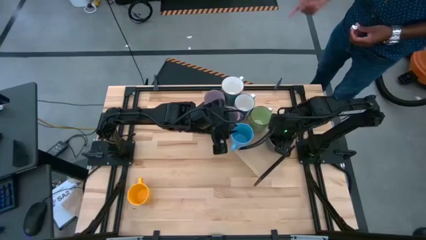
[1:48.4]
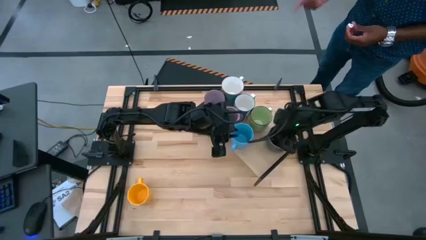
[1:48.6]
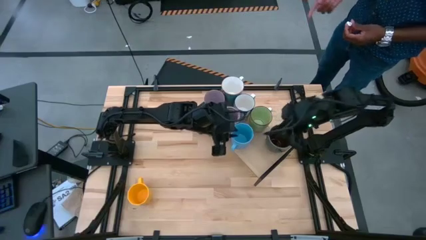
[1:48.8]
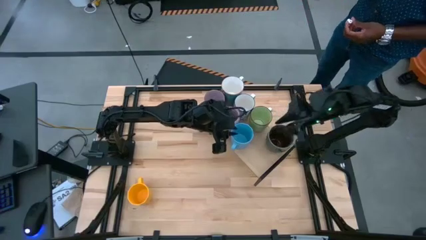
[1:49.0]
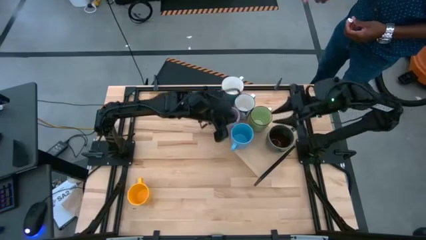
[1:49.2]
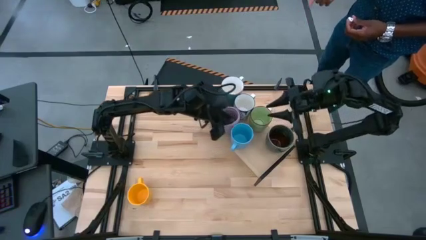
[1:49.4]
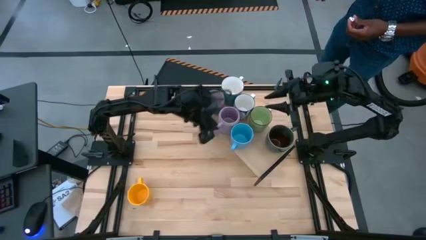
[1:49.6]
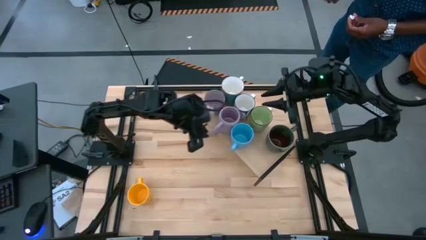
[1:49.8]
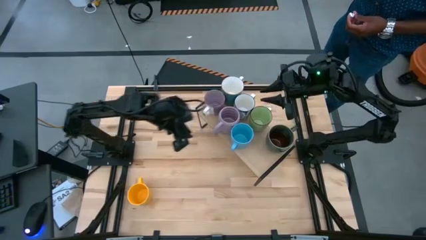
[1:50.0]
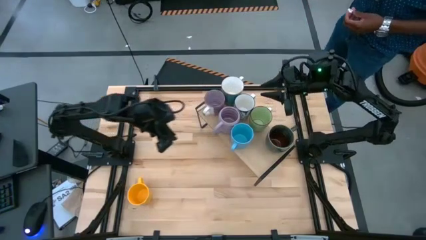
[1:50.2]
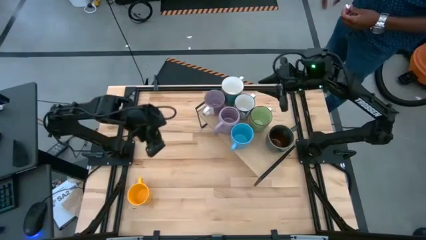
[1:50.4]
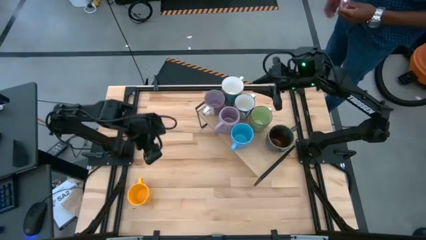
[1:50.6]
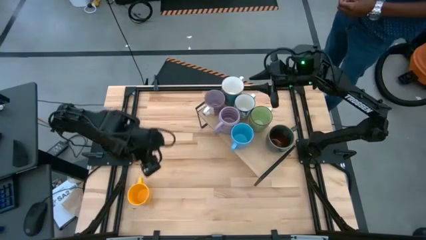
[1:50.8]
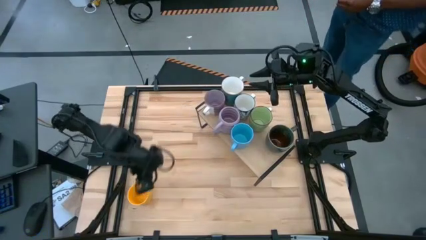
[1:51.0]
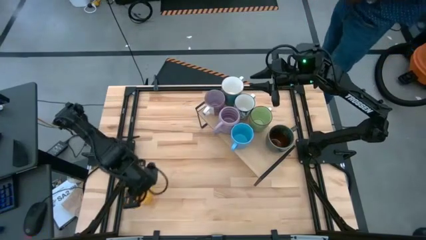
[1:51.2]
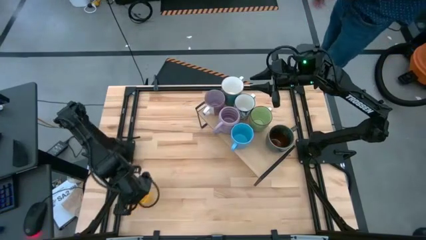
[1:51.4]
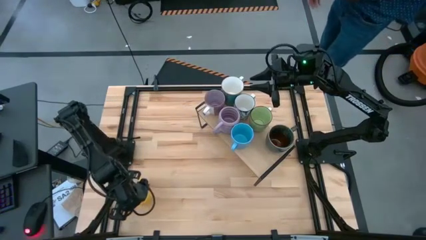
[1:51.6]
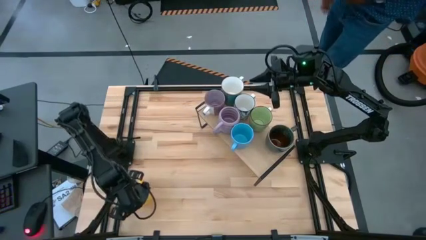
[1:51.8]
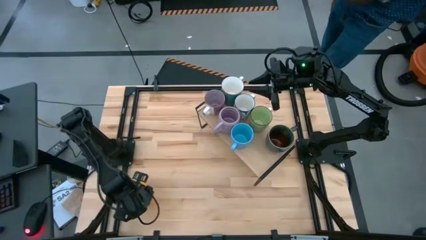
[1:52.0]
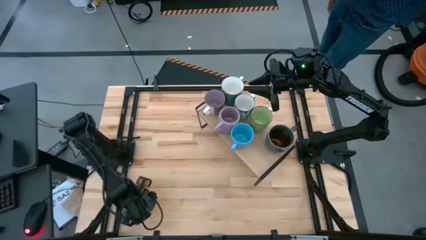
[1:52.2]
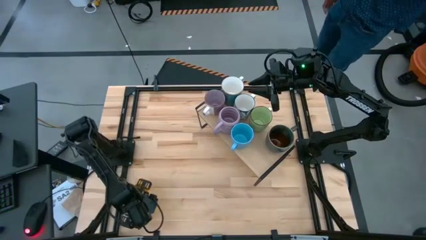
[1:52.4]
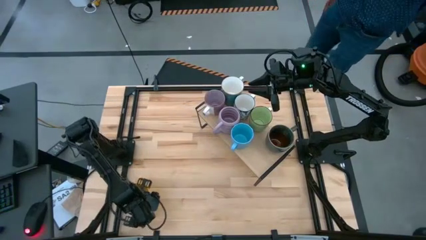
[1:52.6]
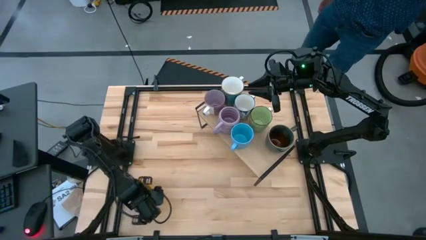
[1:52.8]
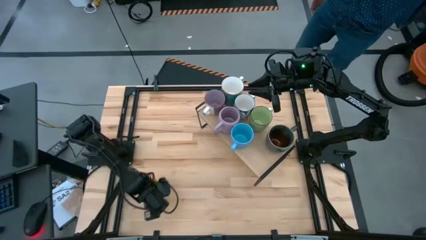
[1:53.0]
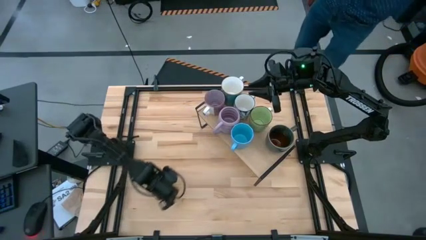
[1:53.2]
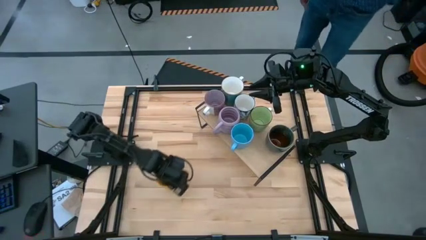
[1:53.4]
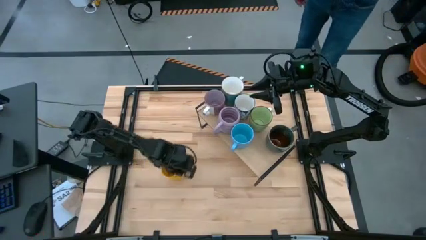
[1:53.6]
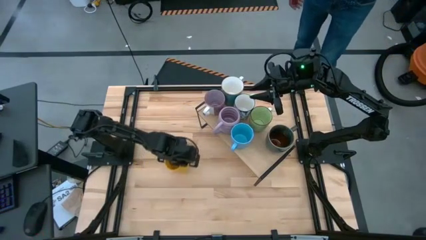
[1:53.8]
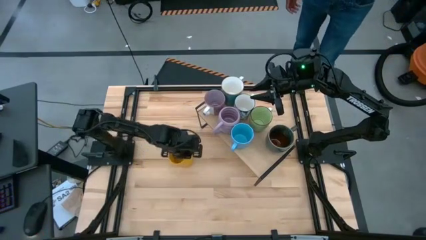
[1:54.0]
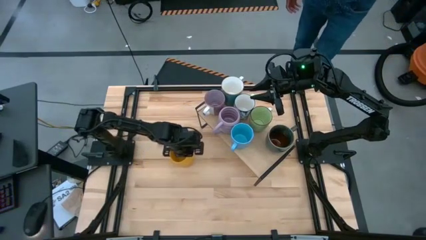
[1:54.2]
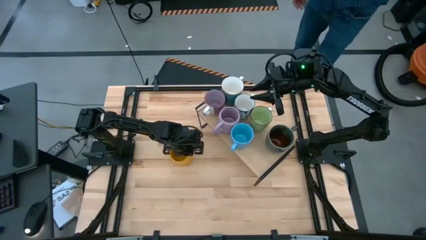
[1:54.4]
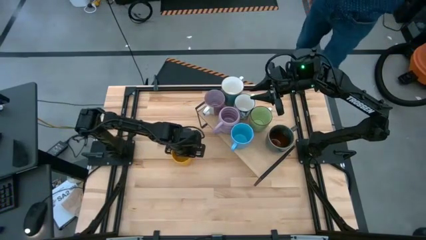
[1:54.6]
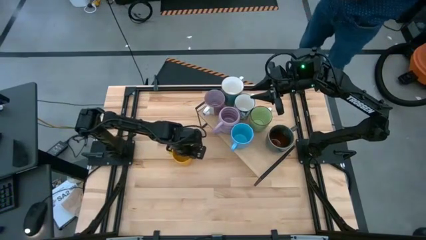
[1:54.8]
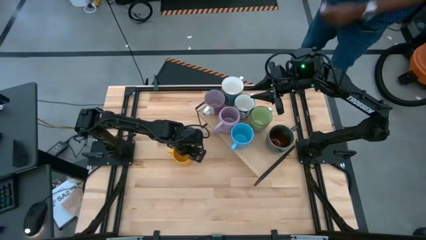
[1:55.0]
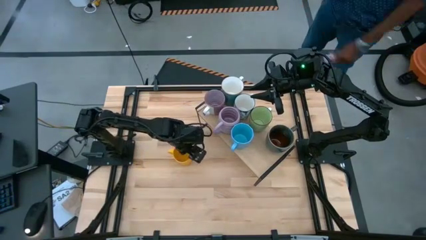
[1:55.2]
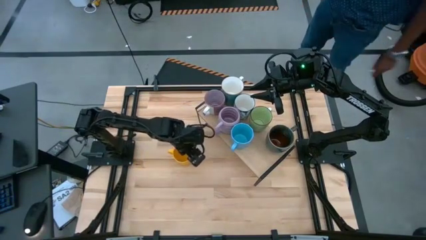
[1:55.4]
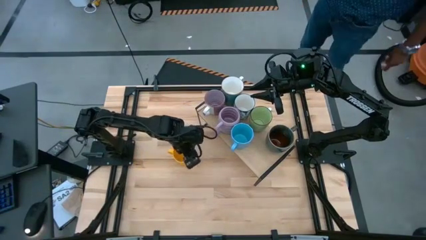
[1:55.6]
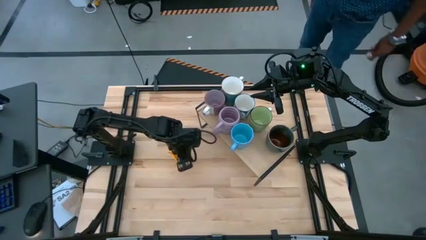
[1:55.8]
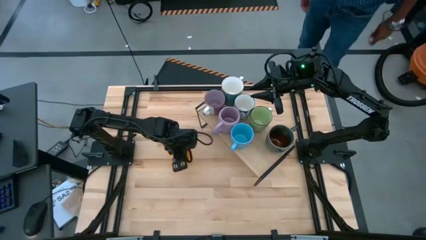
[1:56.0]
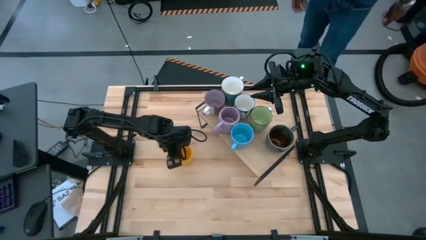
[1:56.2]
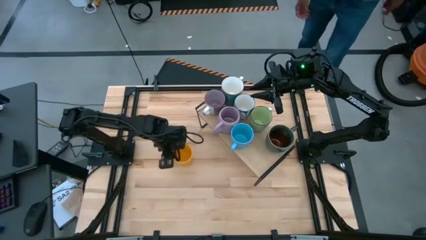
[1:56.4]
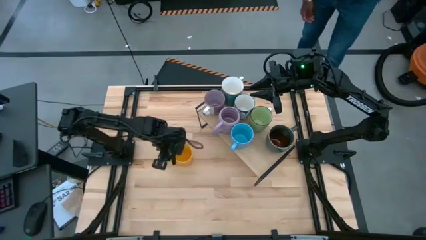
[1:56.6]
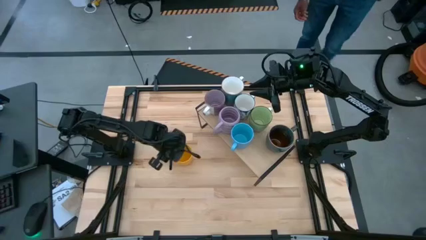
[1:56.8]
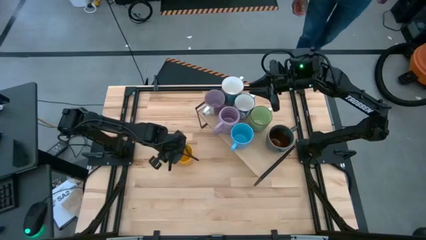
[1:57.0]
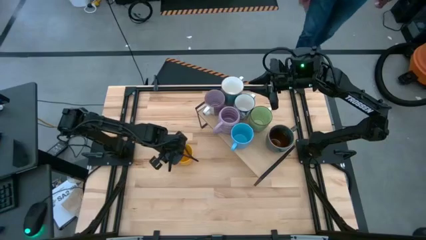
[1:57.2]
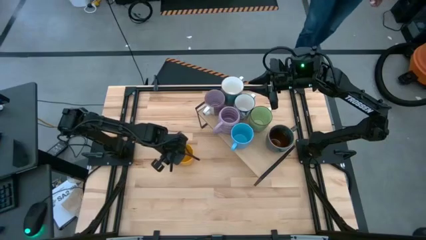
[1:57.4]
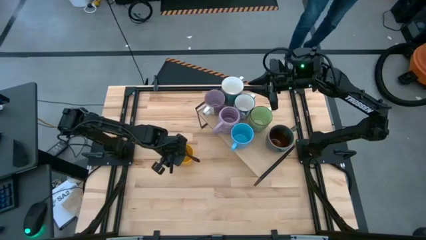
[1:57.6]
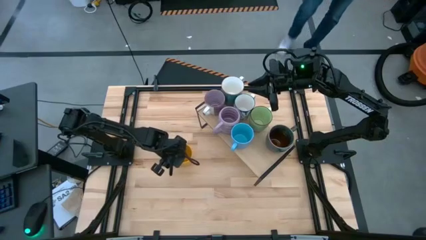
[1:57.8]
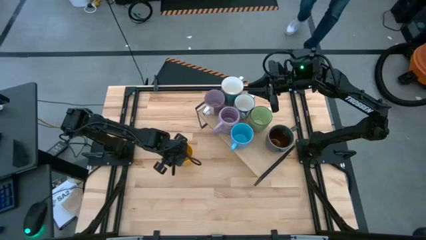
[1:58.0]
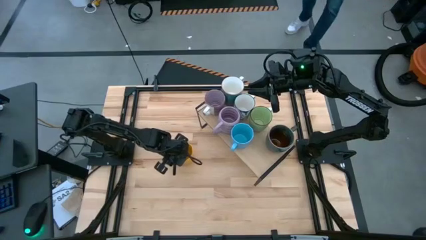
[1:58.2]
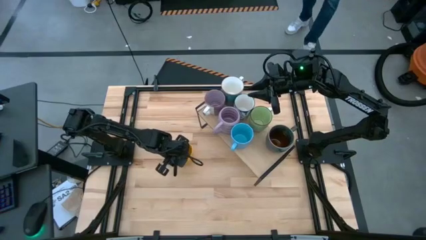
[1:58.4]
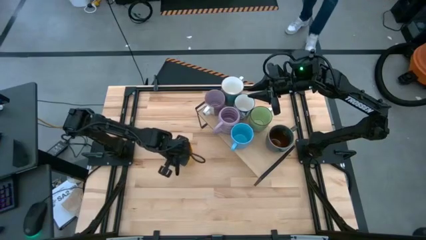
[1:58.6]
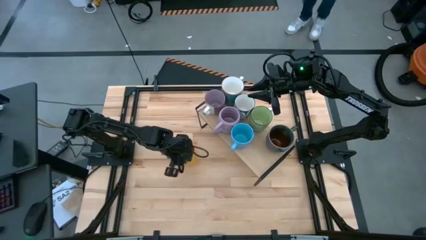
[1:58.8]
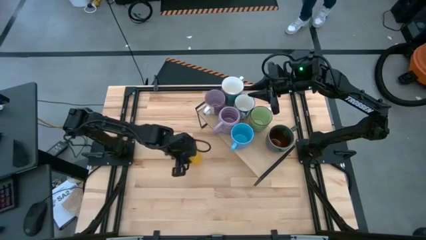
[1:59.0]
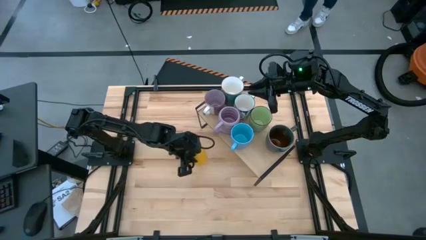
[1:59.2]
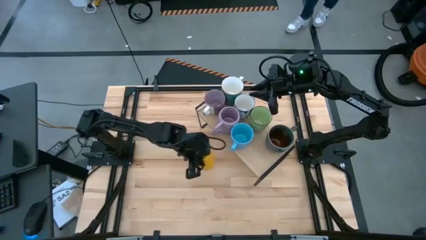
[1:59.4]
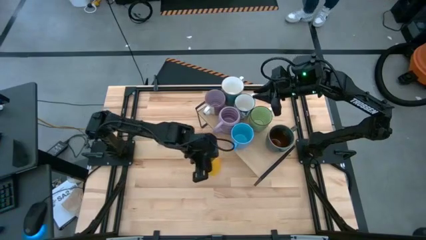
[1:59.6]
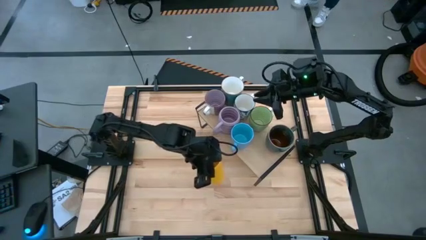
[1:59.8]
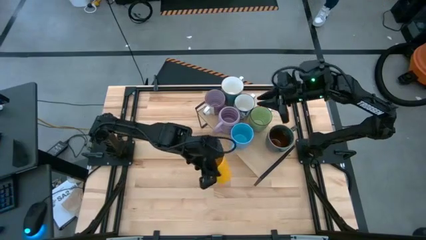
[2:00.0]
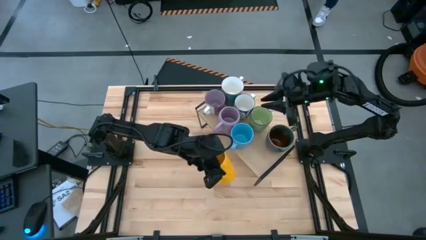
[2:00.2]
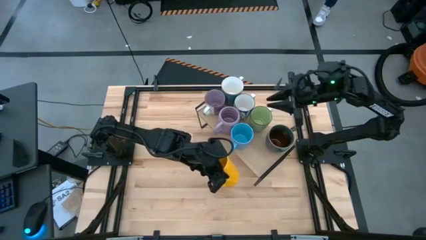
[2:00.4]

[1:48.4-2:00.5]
Task: Place coffee mugs
Put the yellow mug on the shelf

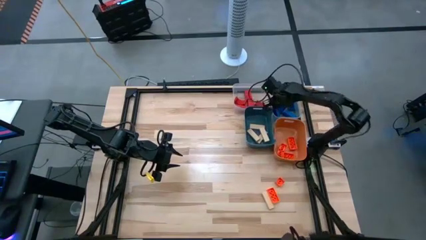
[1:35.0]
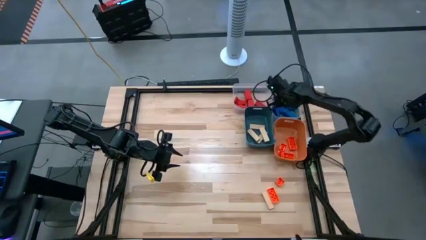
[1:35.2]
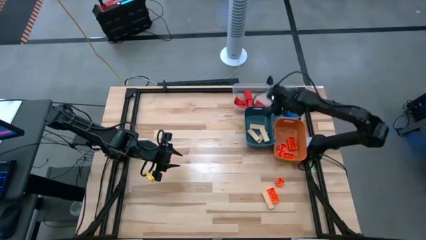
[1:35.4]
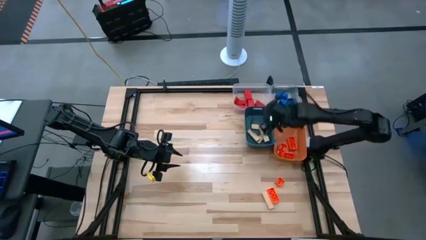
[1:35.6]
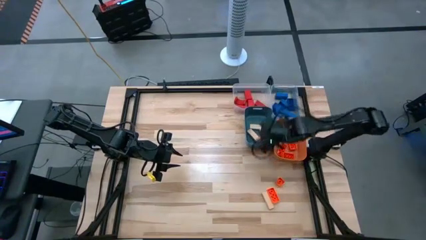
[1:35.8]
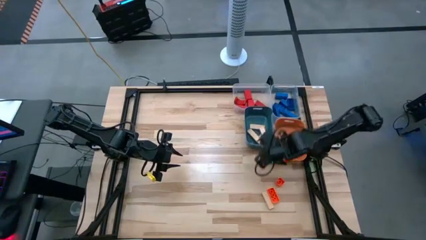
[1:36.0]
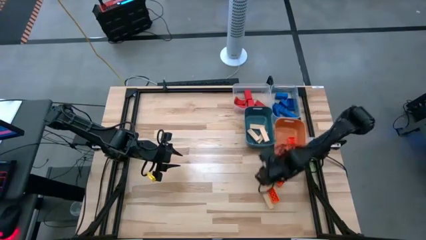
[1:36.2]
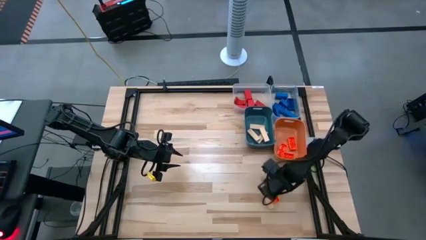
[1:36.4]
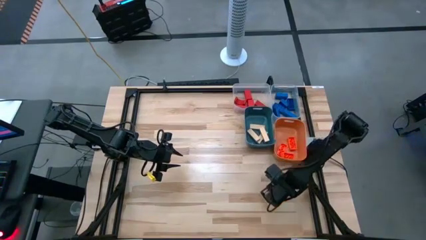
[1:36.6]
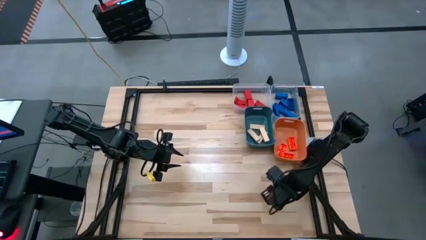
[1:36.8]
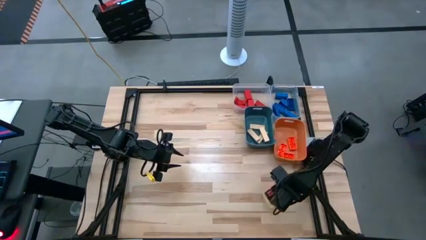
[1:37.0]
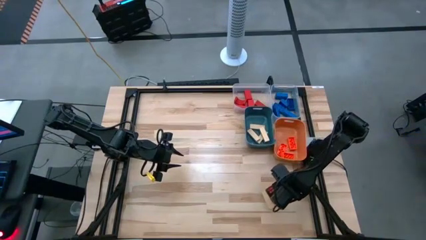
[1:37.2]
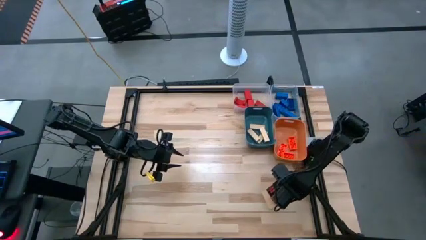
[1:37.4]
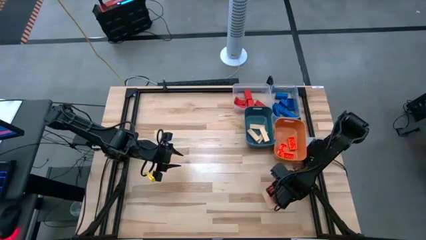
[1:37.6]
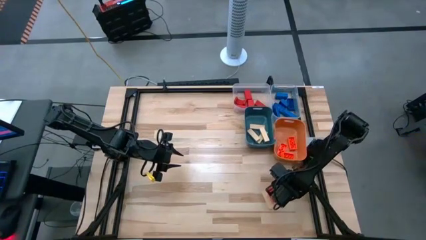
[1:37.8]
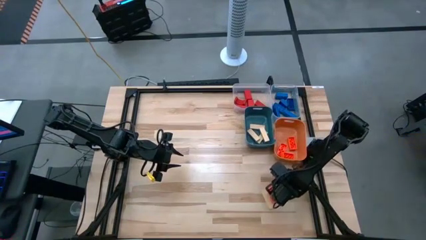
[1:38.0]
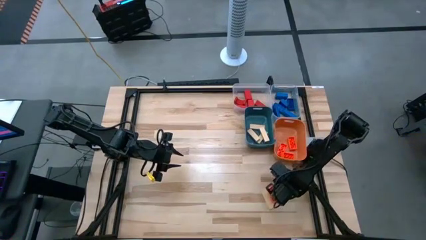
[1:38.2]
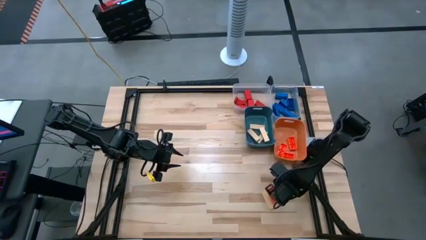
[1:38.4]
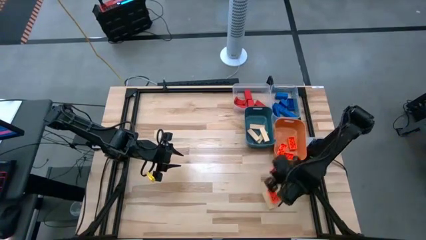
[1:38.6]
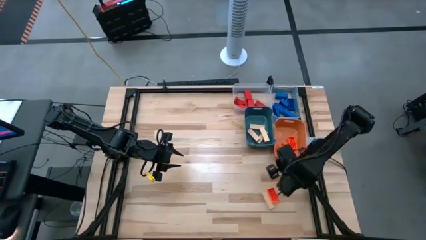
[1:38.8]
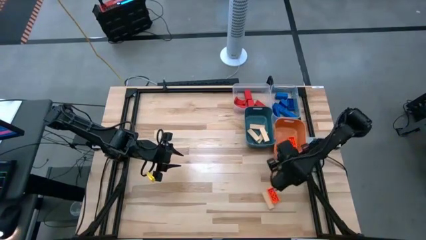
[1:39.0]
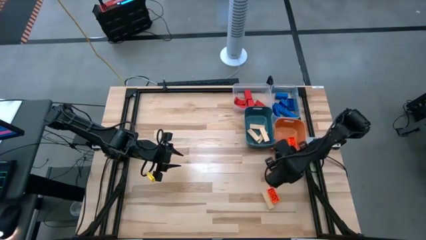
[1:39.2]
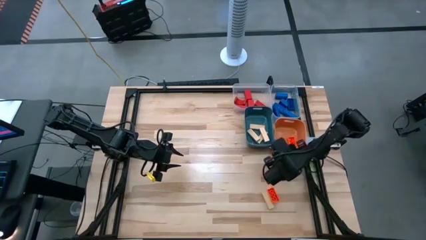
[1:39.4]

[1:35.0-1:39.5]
Task: Sort blocks
Put the 4 stud orange game piece into the orange bin
